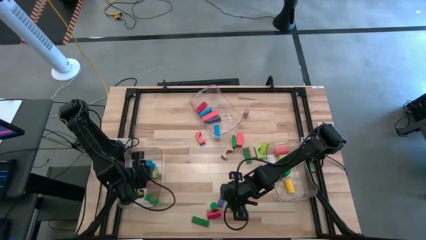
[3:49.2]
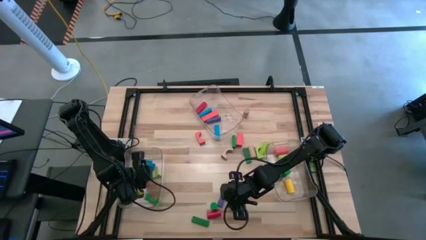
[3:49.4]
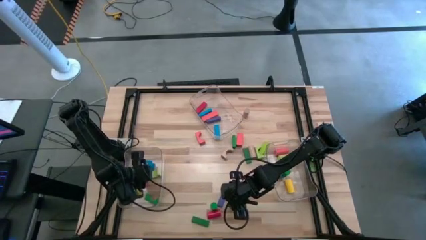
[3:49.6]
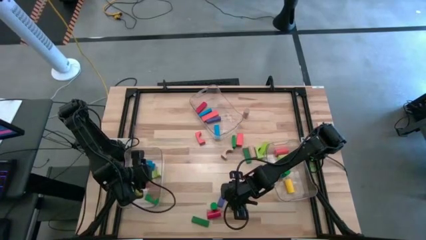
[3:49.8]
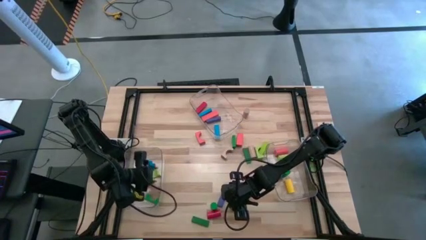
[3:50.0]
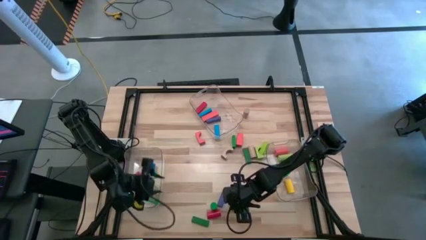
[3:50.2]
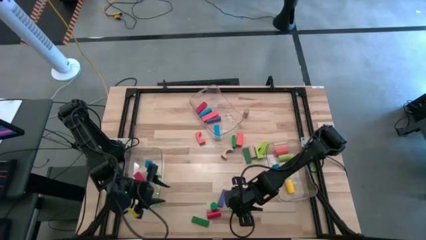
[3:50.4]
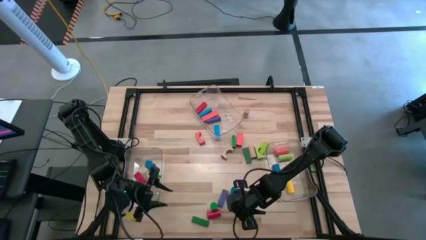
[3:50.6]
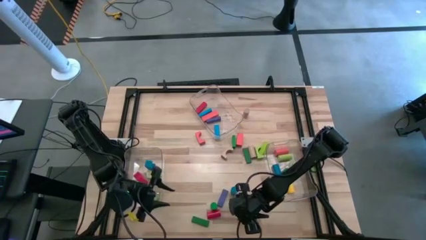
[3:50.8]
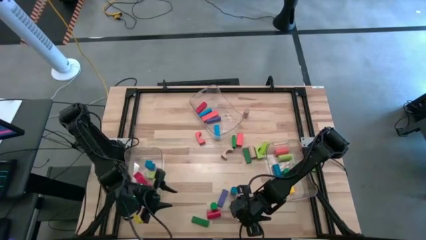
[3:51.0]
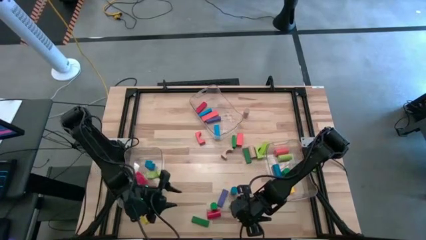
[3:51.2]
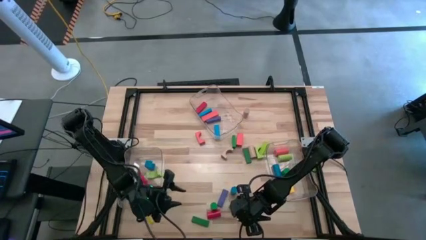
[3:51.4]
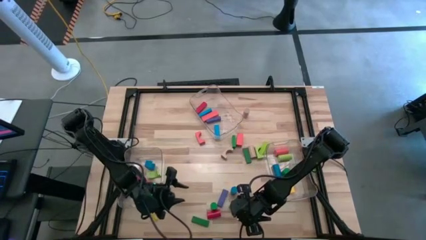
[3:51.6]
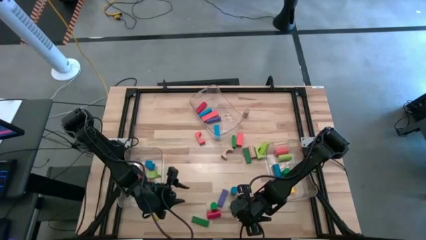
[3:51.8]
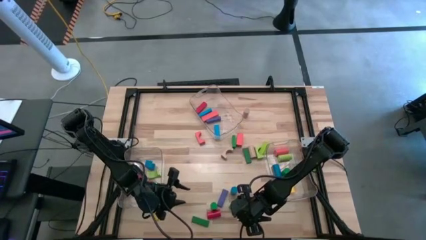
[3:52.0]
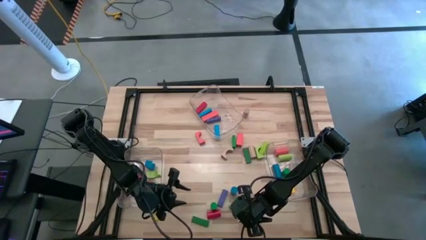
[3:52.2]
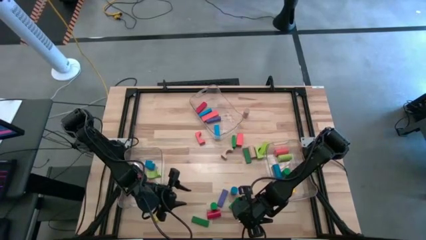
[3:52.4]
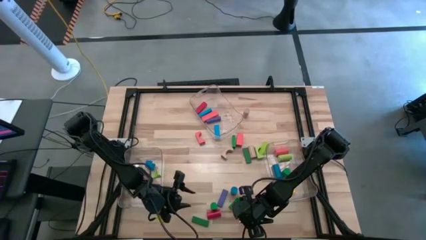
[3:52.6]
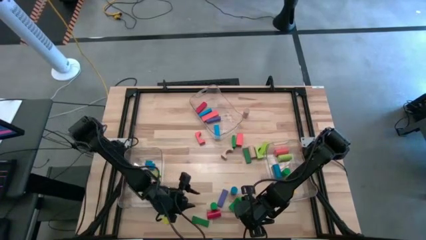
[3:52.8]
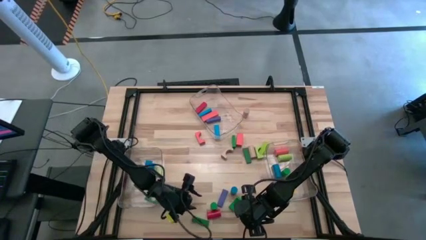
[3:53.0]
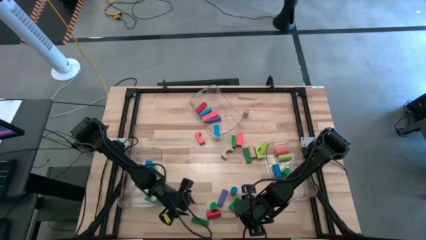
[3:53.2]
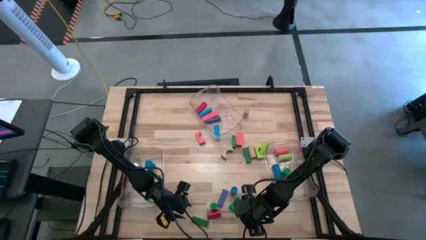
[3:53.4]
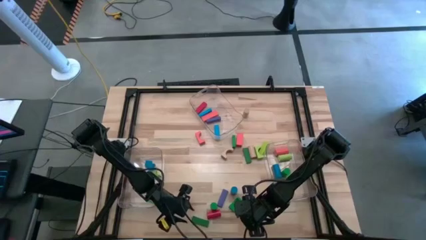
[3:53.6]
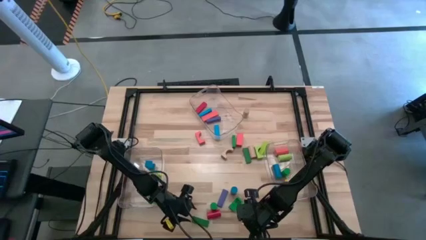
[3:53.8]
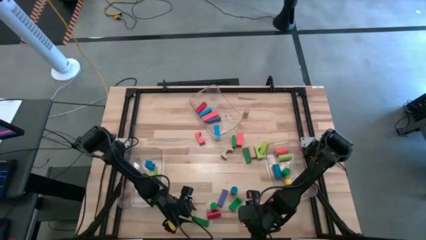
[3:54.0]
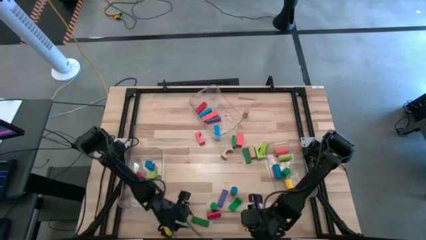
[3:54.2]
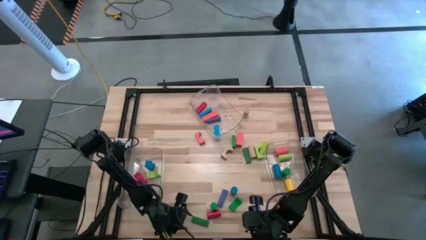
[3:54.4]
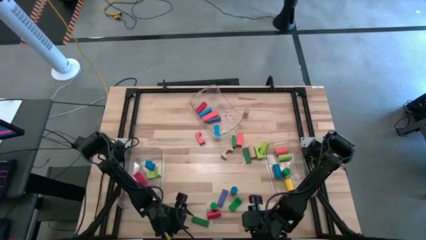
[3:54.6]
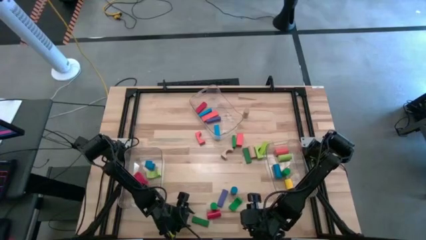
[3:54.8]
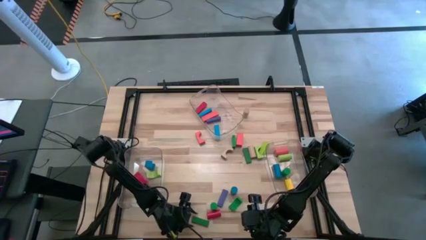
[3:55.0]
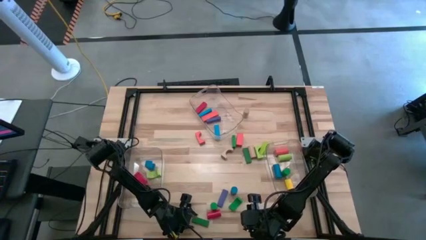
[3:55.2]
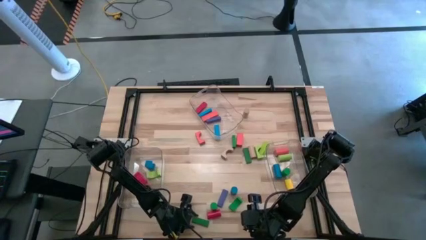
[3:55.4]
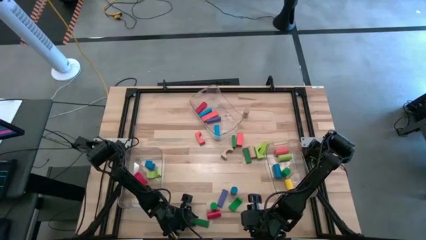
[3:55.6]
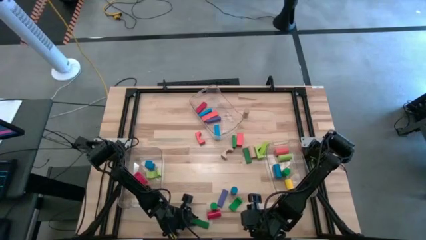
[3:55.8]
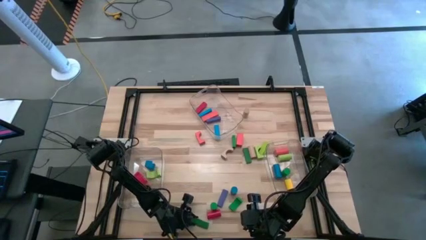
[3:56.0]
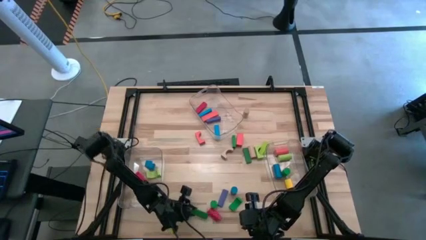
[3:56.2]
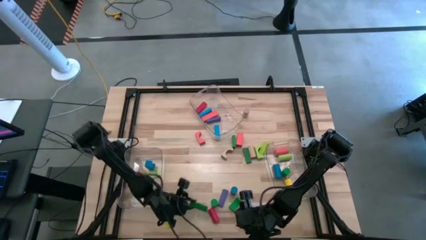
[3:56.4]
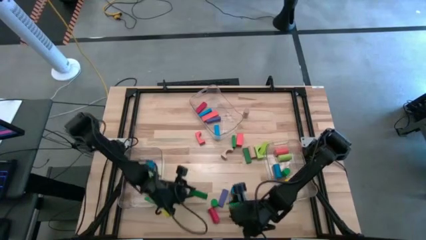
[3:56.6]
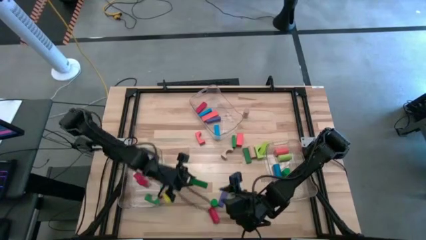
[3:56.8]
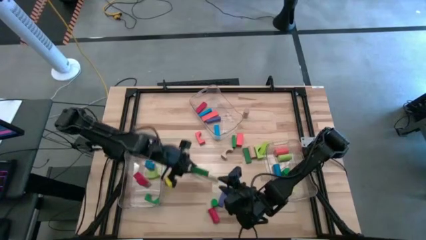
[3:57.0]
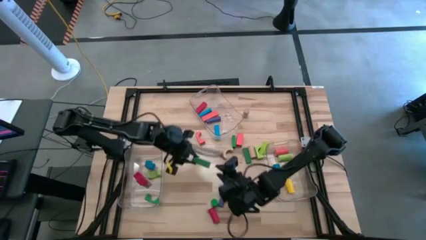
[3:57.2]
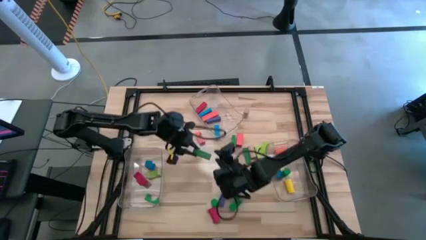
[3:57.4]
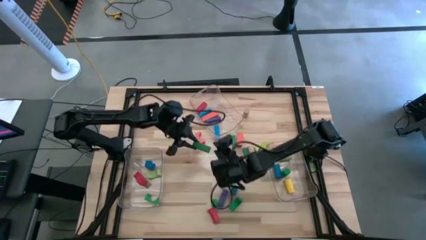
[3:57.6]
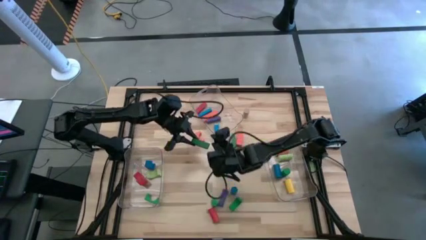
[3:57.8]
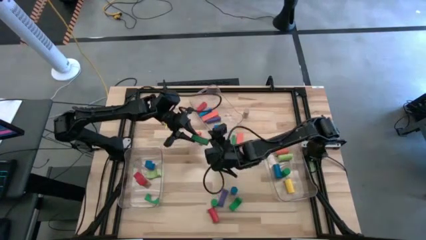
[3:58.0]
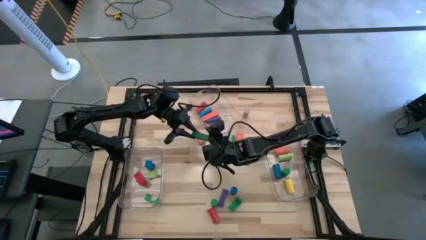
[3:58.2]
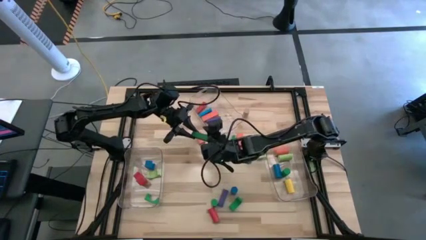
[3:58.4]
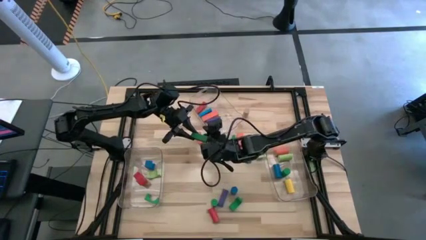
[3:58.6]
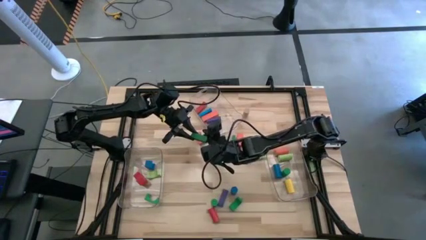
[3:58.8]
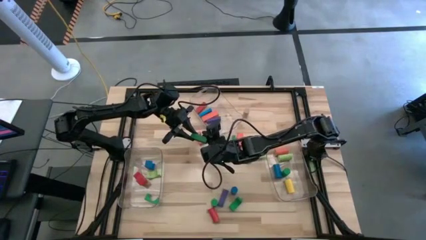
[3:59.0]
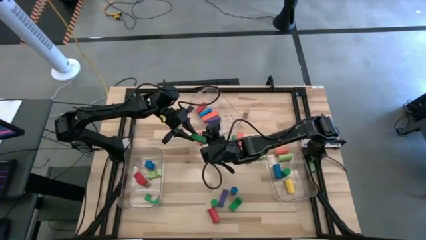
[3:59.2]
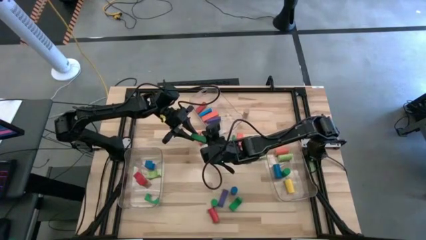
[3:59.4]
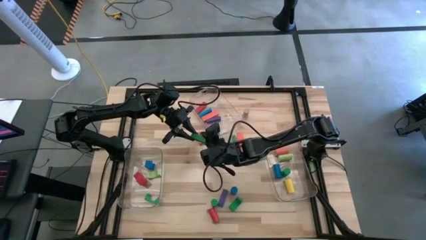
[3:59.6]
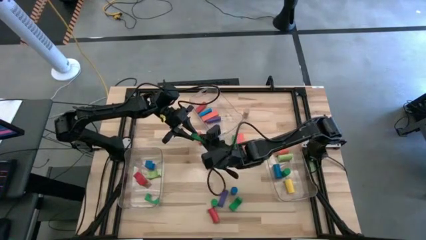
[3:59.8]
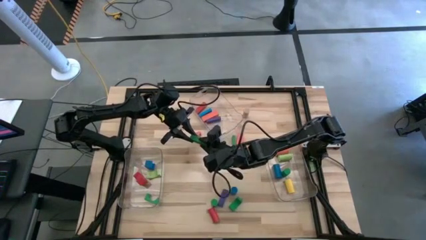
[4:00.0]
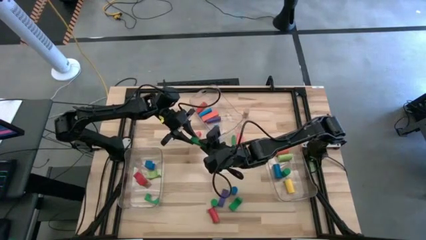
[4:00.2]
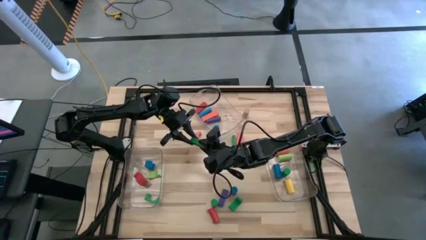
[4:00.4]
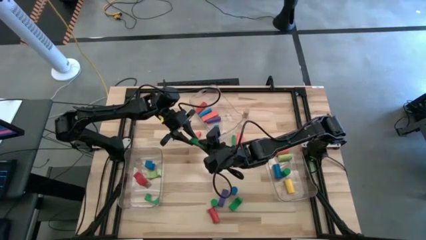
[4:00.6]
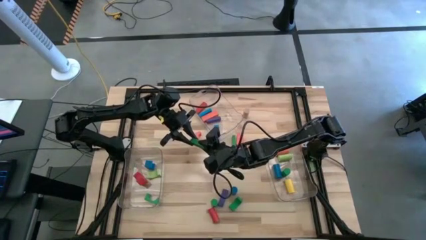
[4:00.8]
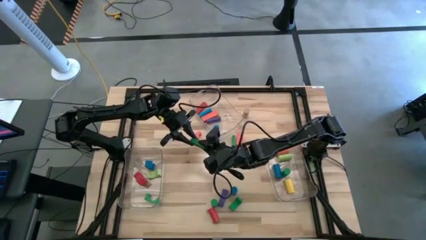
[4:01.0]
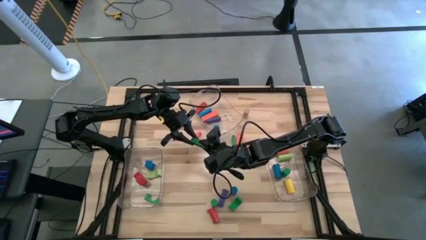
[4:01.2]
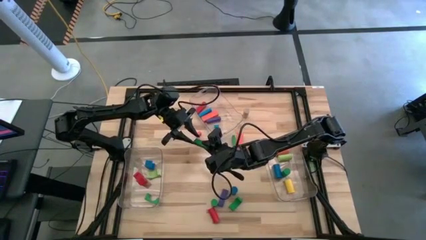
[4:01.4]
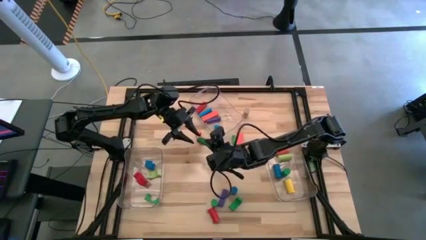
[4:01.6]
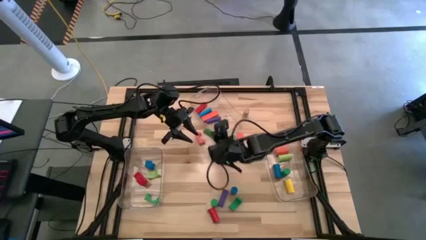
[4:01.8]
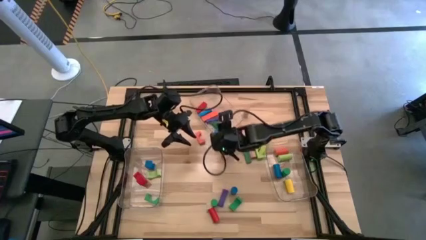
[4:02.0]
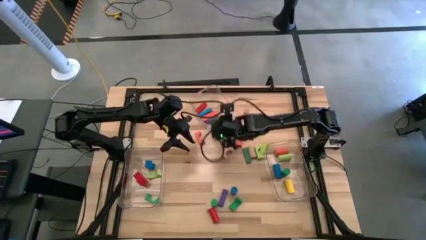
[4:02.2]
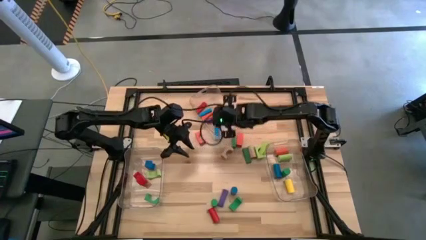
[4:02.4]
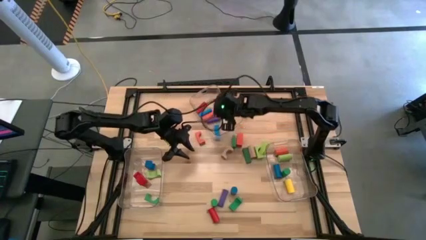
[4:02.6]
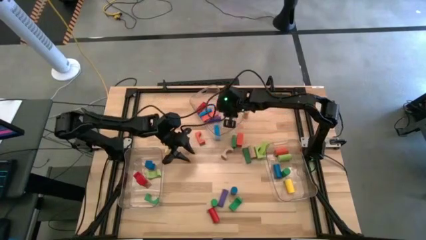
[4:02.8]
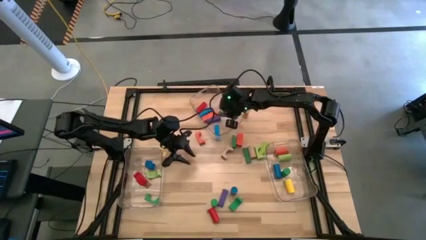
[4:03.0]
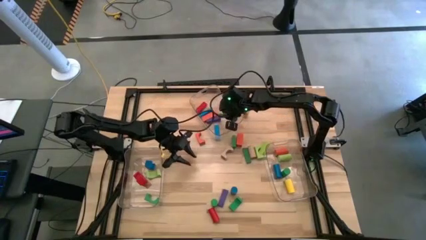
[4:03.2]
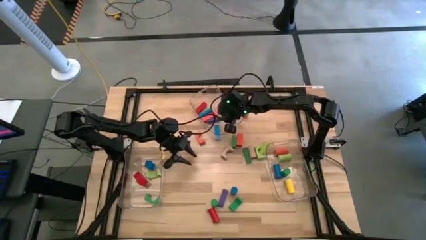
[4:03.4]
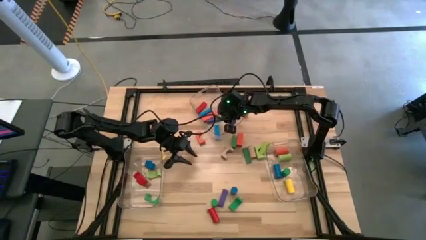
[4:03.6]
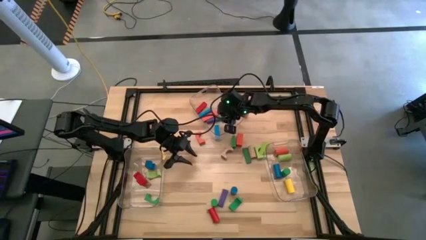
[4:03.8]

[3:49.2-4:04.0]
Task: Sort blocks by size
Put the green rectangular block into the top transparent bin
